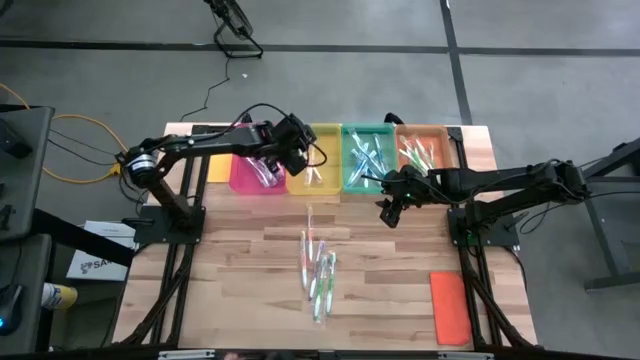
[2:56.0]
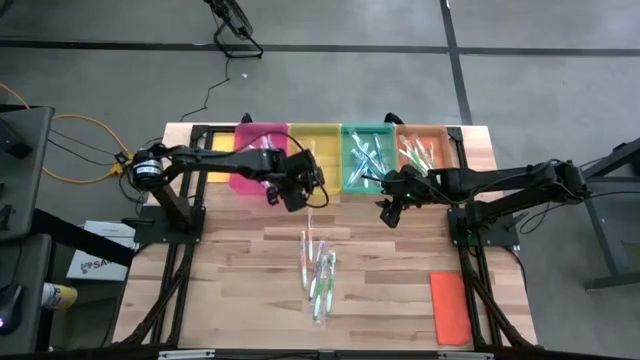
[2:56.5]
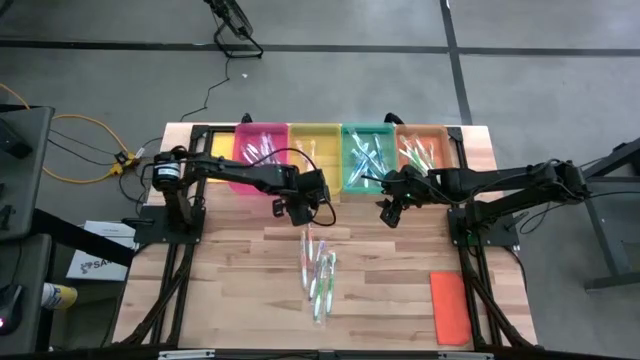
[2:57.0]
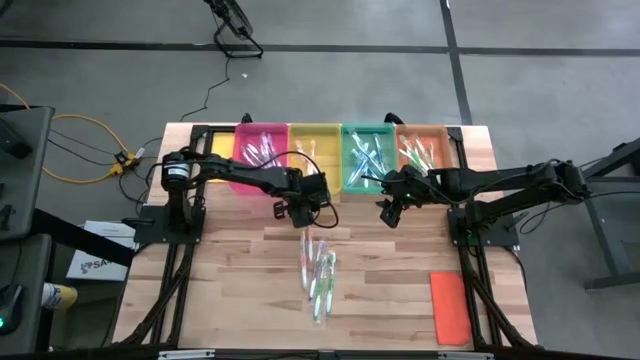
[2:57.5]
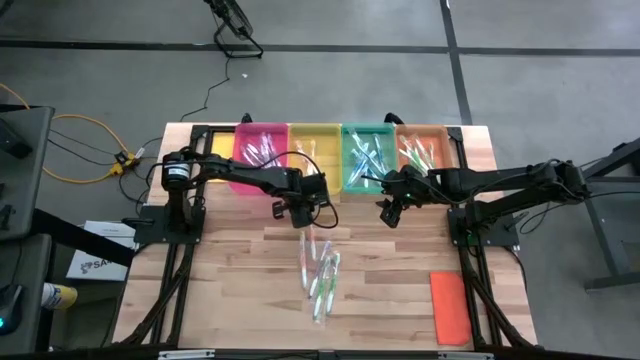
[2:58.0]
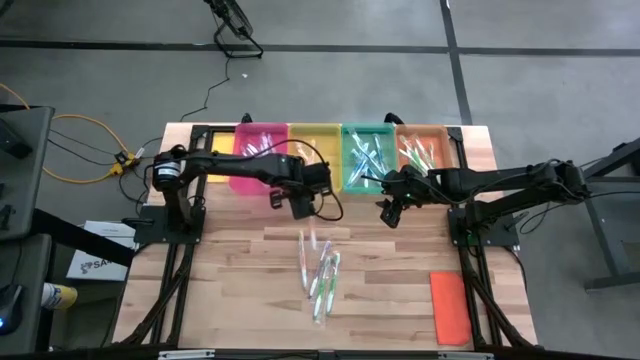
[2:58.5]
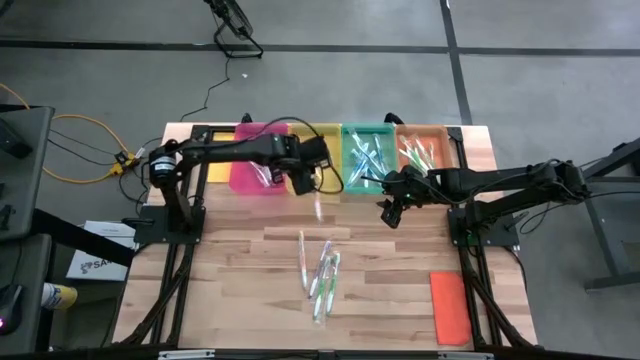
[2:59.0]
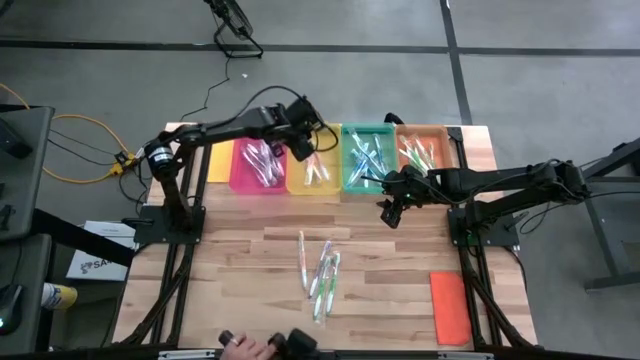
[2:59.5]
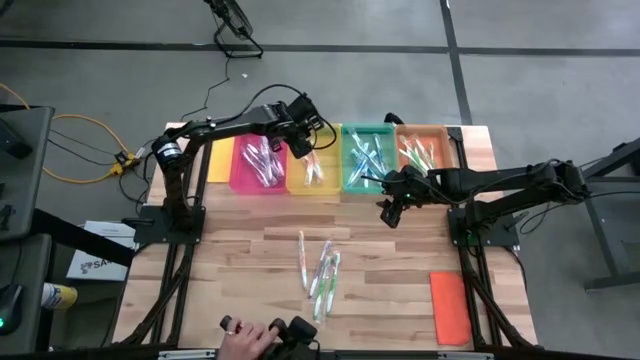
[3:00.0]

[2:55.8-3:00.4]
Task: Pick & Place Toothbrushes
Put the orange toothbrush into the yellow bin

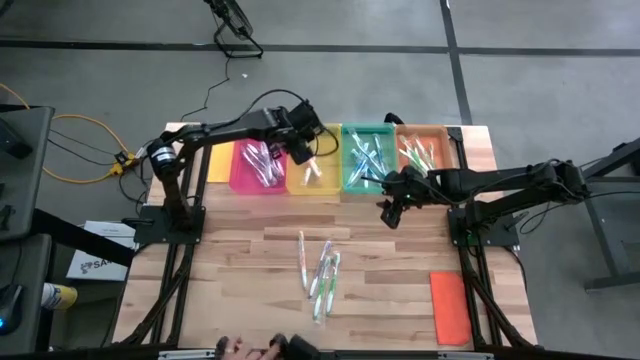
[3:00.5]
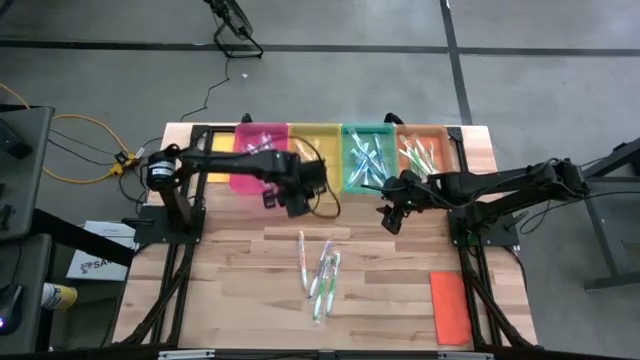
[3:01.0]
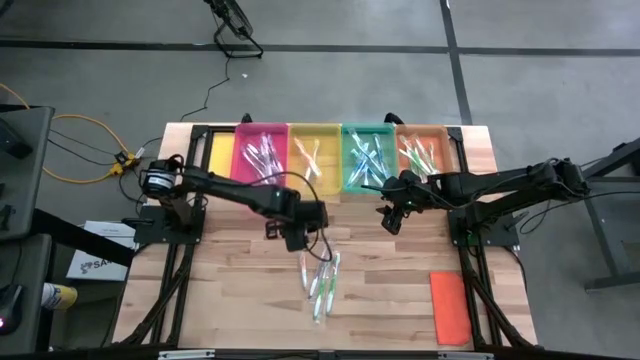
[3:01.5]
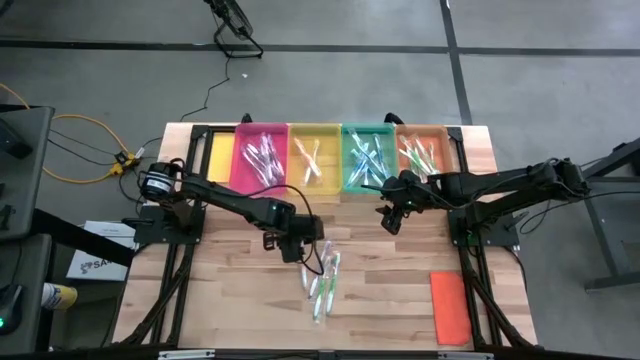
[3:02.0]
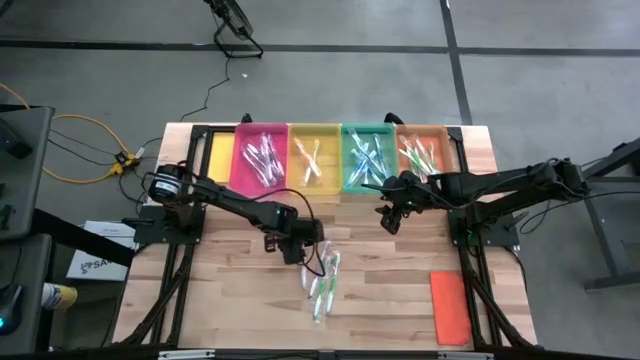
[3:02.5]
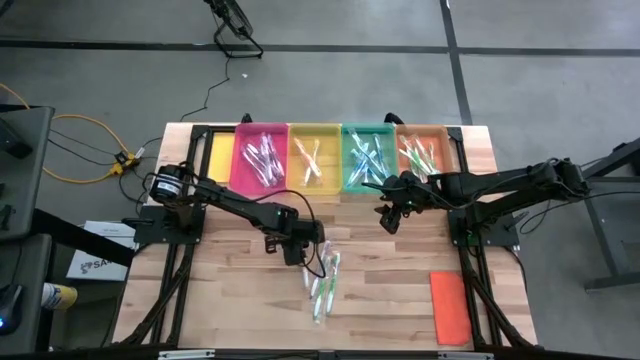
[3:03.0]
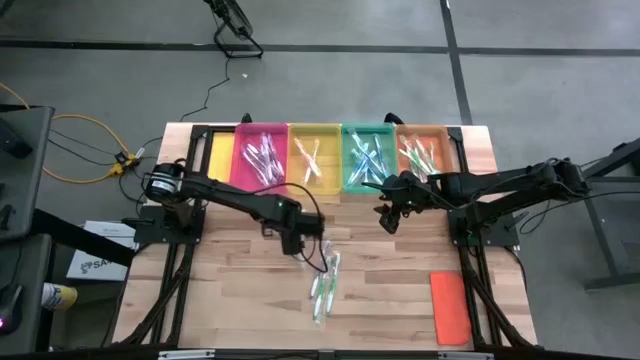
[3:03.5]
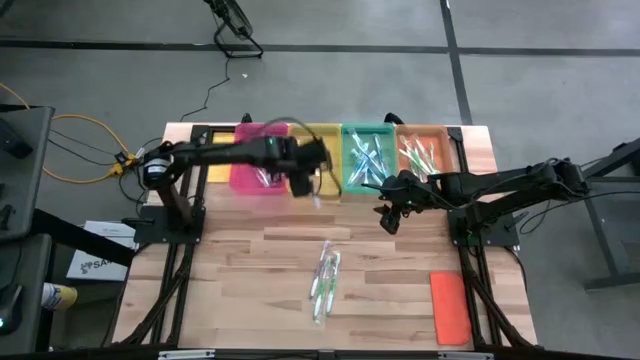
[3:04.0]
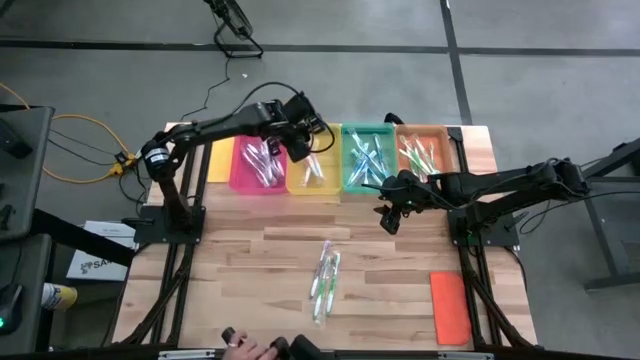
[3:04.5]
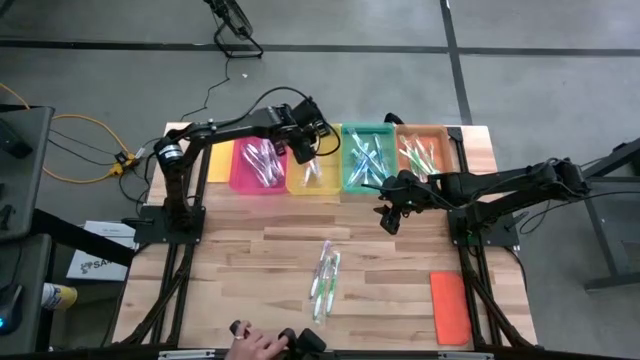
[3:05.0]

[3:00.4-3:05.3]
Put the orange toothbrush into the yellow bin

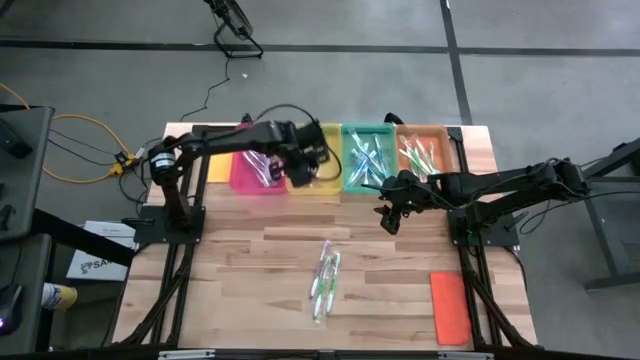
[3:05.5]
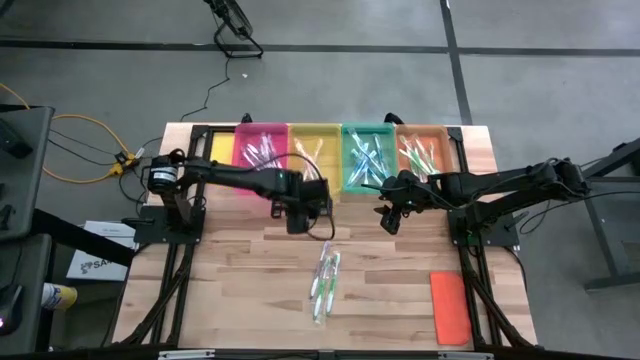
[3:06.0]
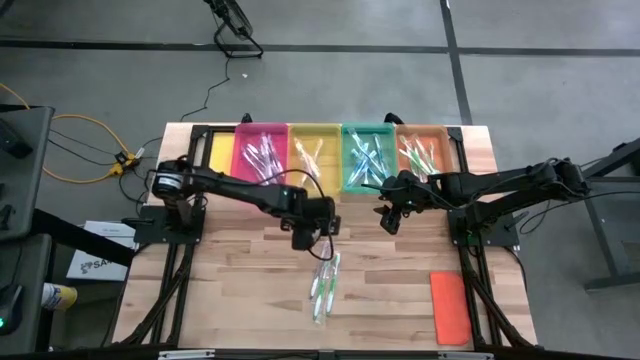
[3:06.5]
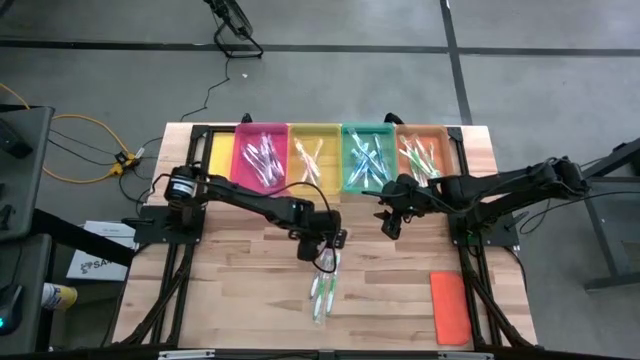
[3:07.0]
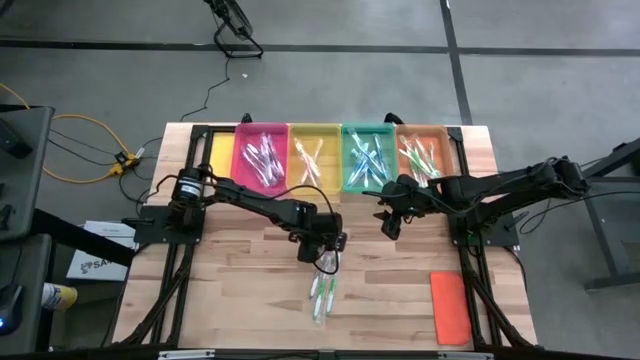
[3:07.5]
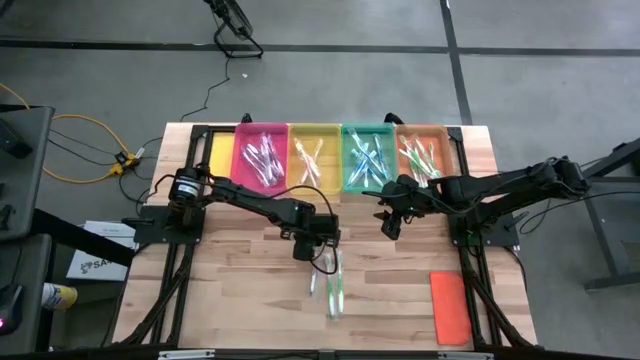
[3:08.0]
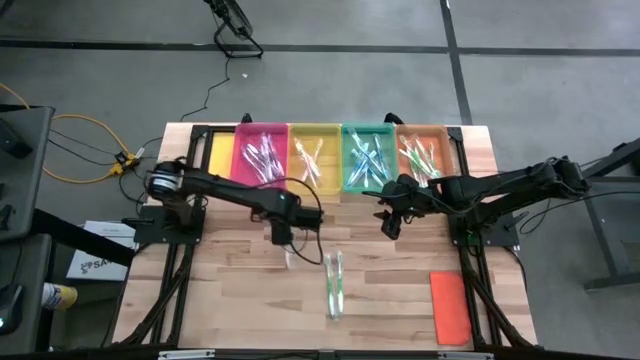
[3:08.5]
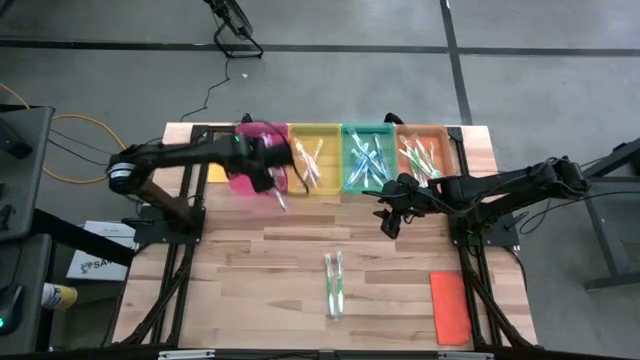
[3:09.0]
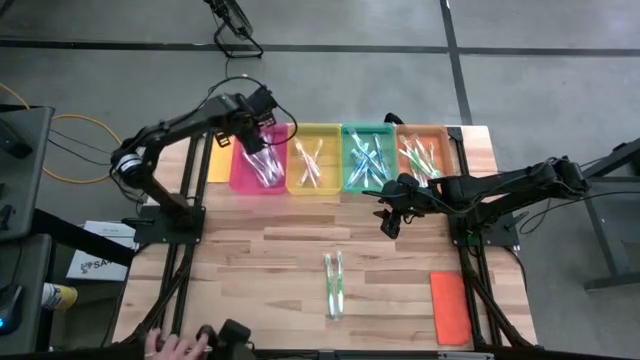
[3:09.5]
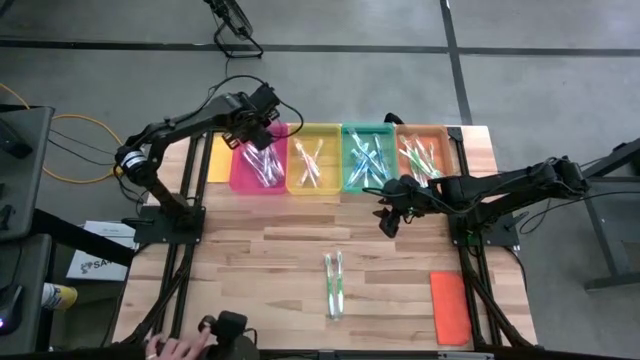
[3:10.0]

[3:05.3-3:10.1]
Put the purple toothbrush into the pink bin

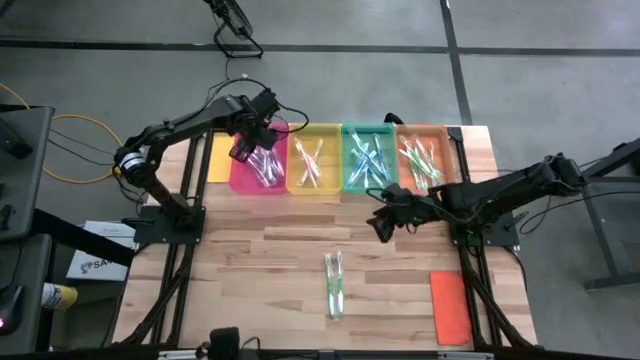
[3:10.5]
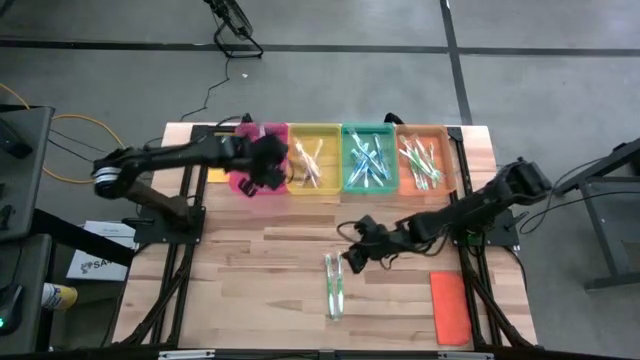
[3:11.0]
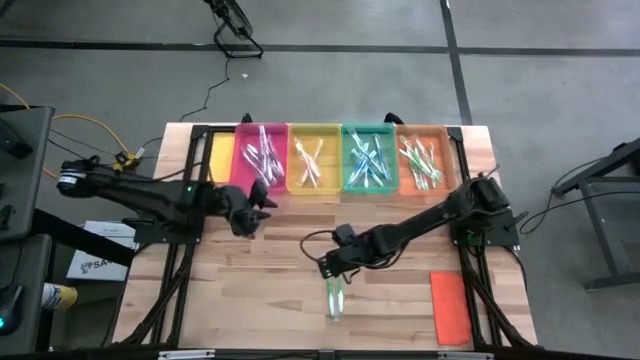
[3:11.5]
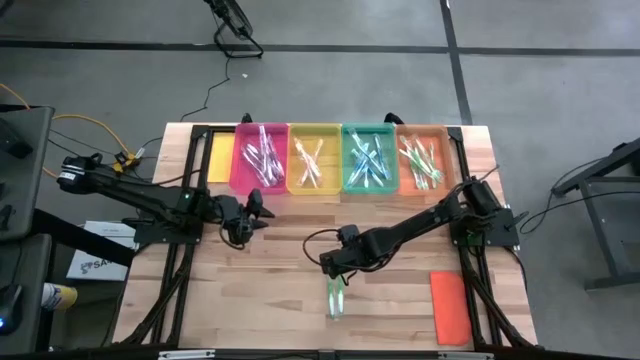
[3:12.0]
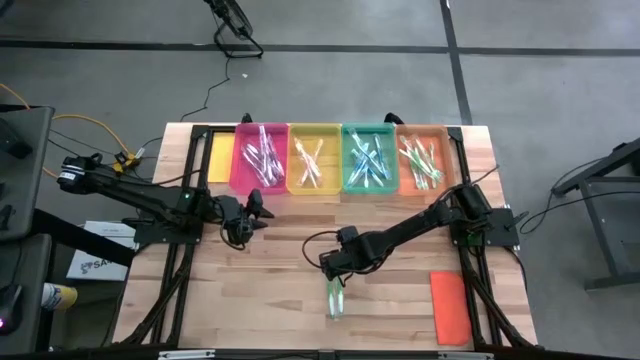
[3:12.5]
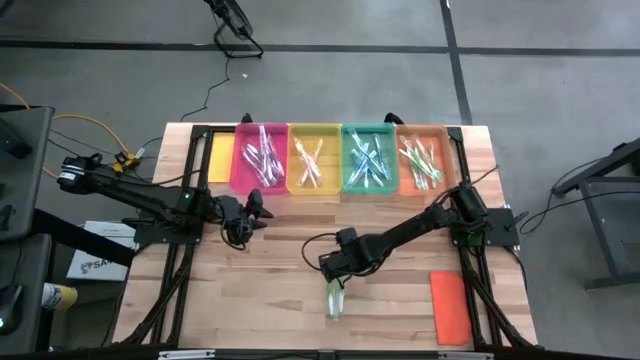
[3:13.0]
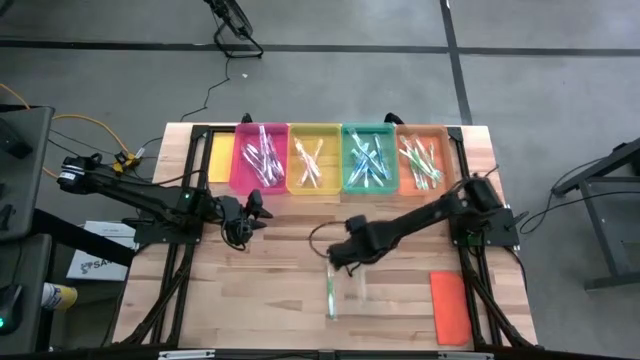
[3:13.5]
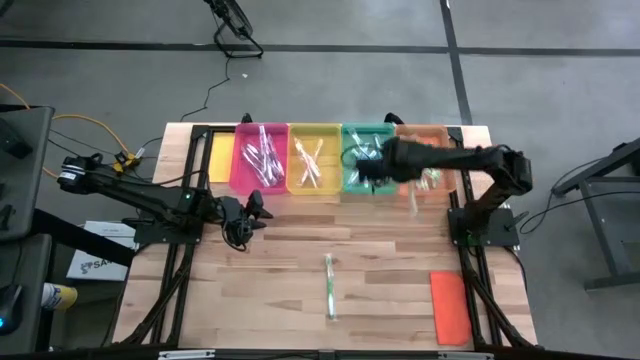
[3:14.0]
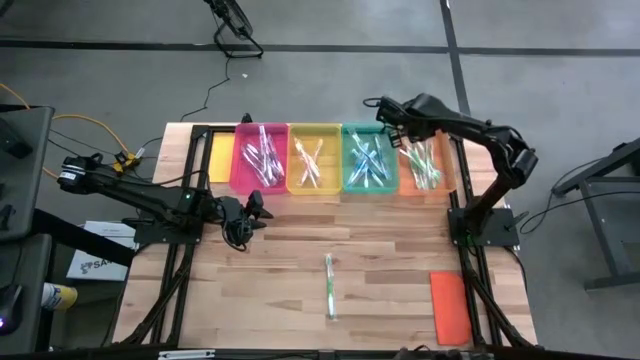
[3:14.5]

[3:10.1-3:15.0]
Put the green toothbrush into the orange bin

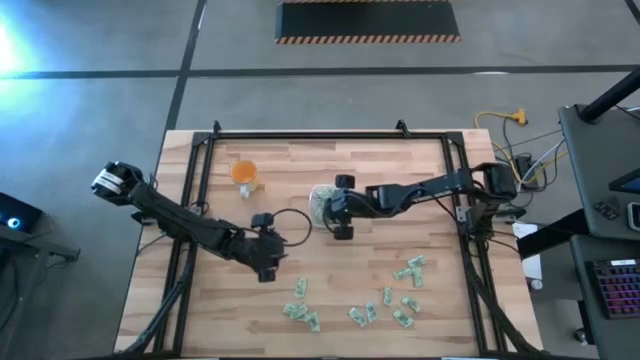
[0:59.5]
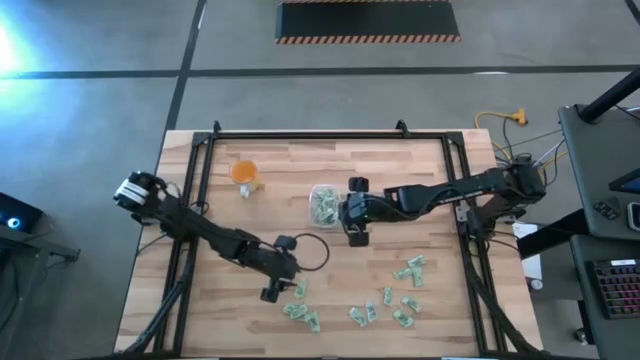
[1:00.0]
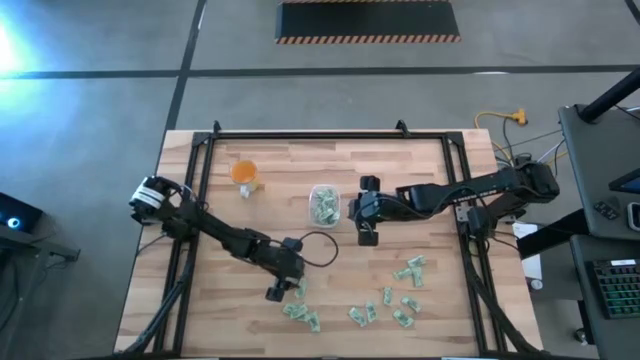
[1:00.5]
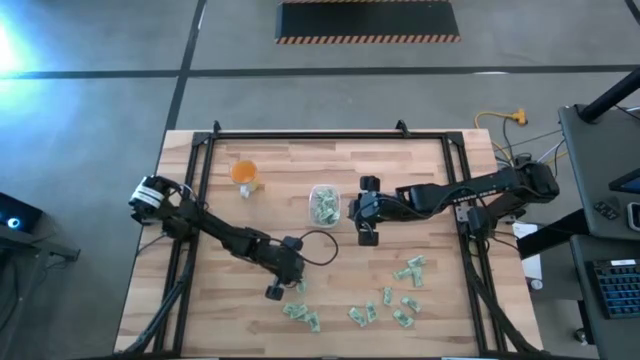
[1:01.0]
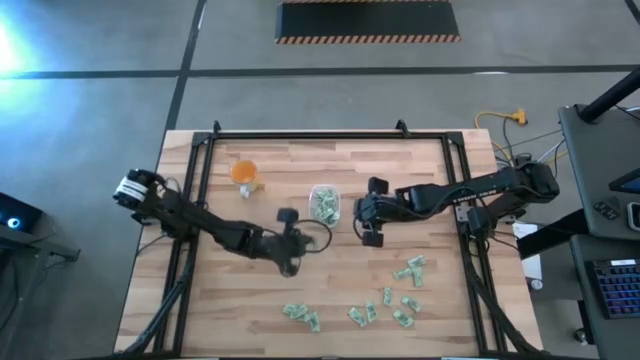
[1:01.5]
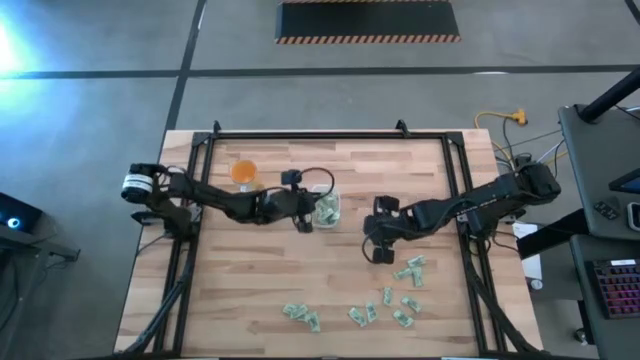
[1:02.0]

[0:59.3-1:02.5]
Task: Pick and place Stevia / Truvia into bins
Put the stevia packet into the bin
